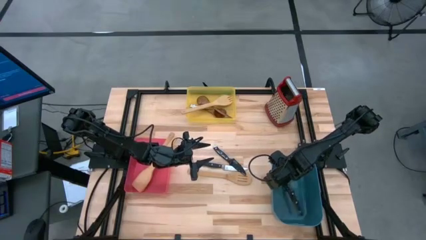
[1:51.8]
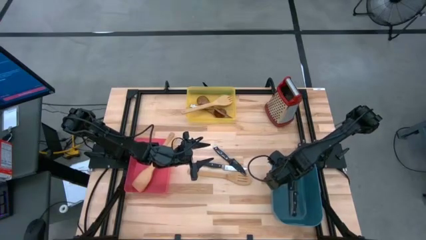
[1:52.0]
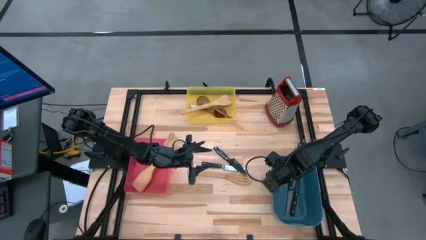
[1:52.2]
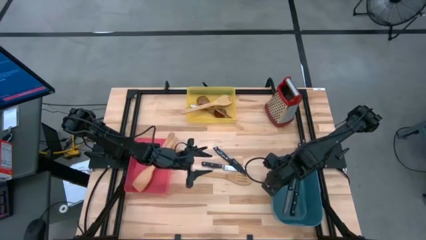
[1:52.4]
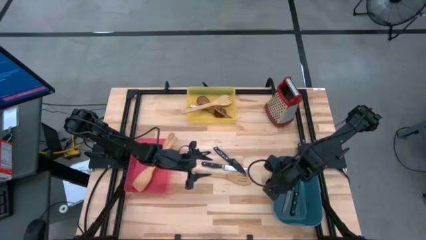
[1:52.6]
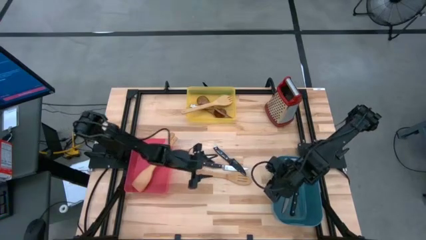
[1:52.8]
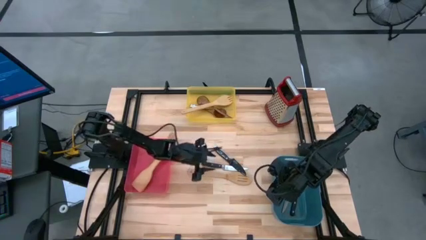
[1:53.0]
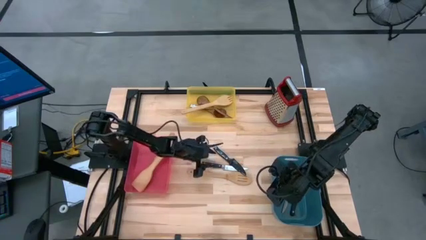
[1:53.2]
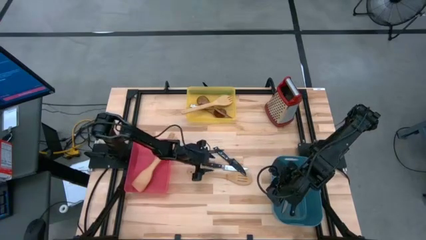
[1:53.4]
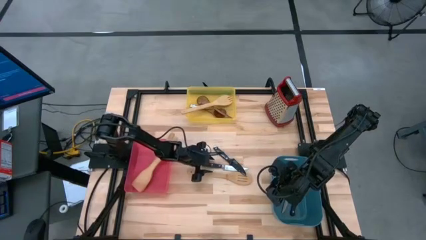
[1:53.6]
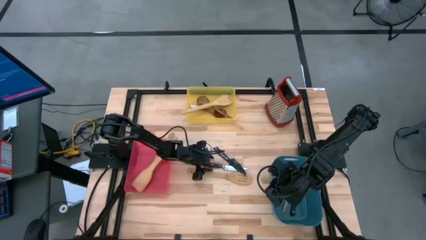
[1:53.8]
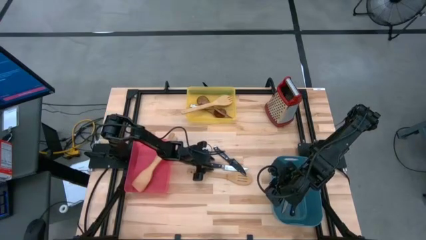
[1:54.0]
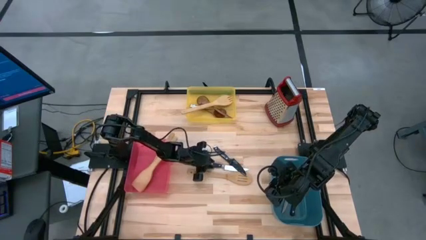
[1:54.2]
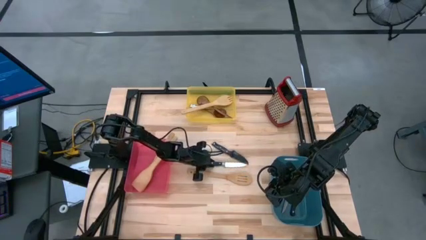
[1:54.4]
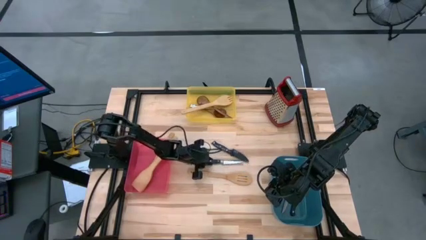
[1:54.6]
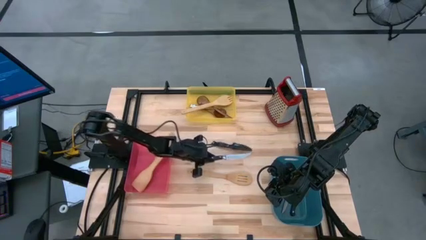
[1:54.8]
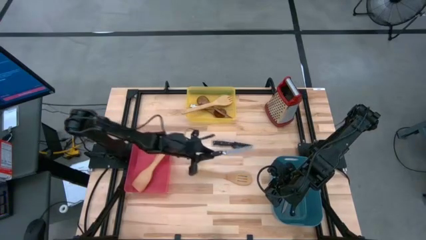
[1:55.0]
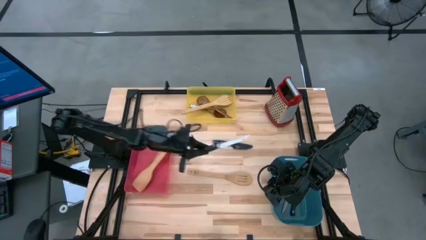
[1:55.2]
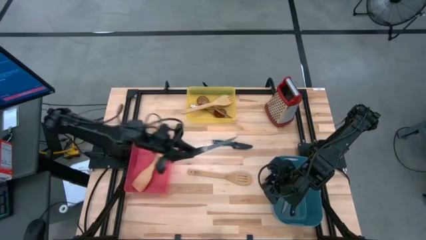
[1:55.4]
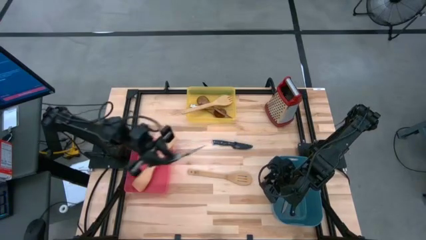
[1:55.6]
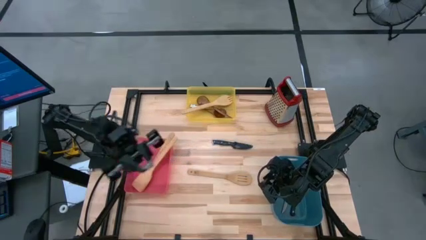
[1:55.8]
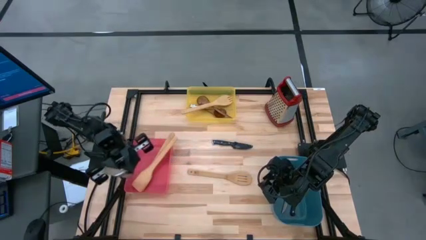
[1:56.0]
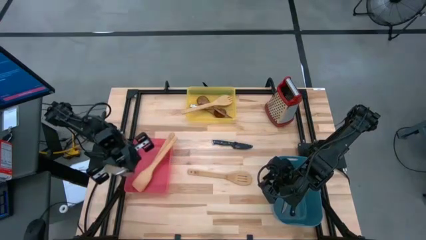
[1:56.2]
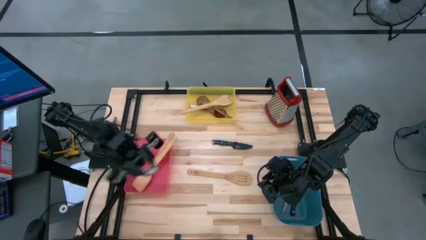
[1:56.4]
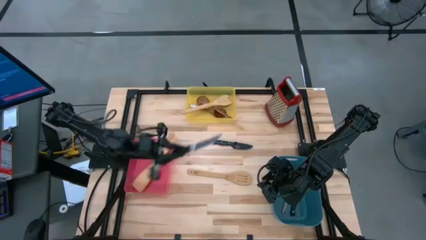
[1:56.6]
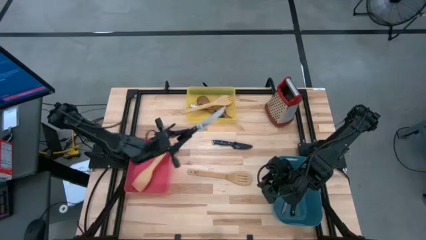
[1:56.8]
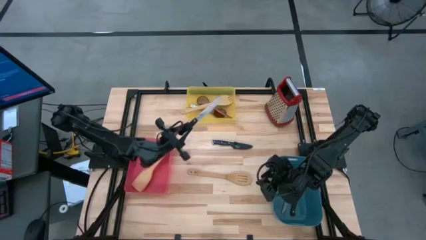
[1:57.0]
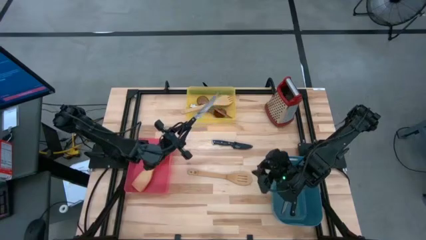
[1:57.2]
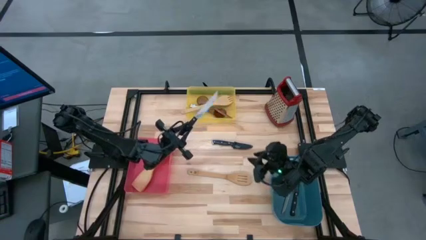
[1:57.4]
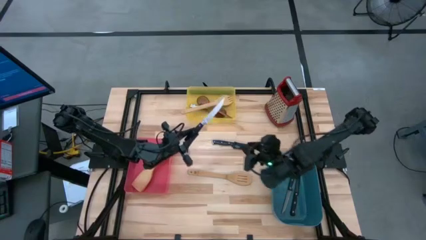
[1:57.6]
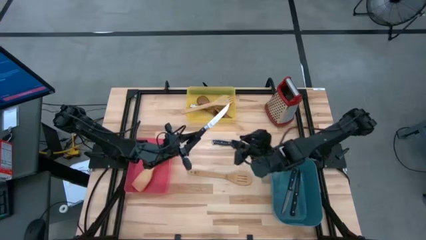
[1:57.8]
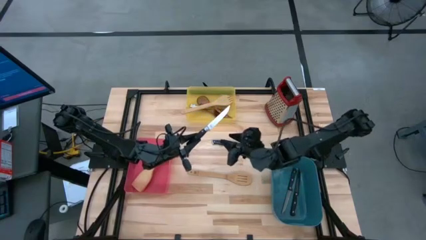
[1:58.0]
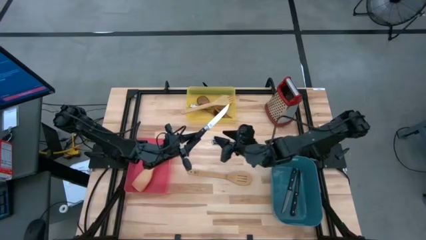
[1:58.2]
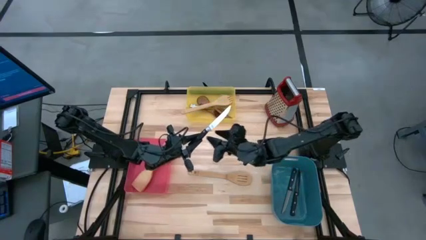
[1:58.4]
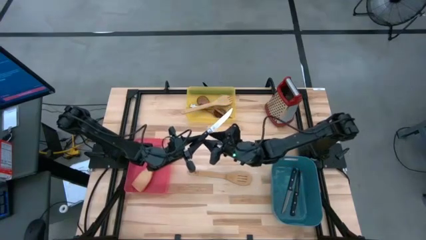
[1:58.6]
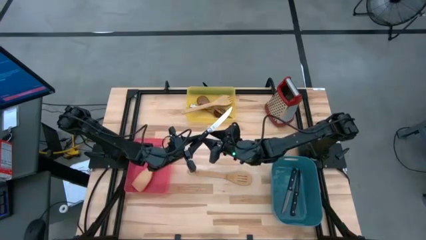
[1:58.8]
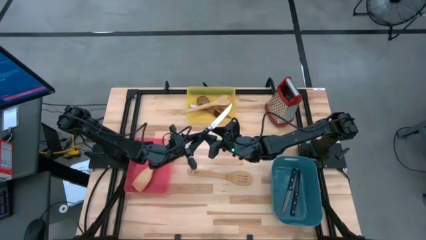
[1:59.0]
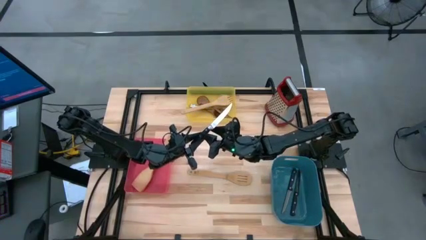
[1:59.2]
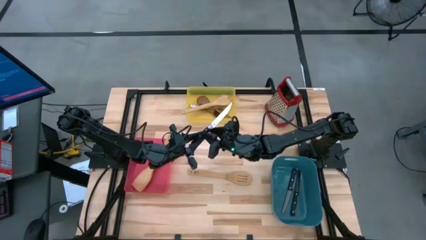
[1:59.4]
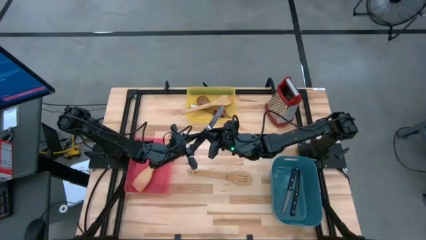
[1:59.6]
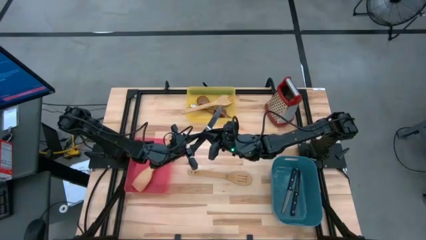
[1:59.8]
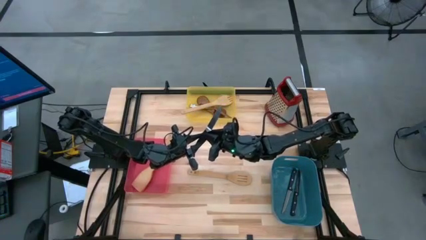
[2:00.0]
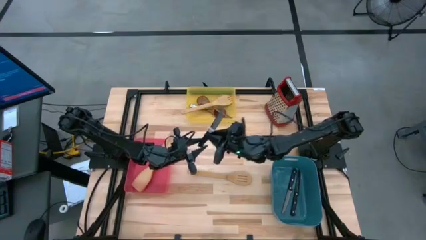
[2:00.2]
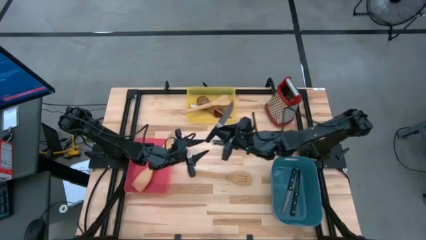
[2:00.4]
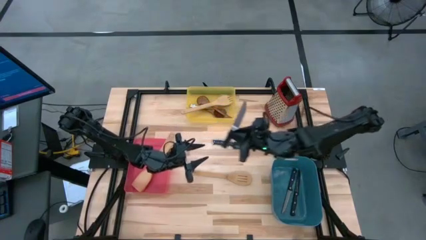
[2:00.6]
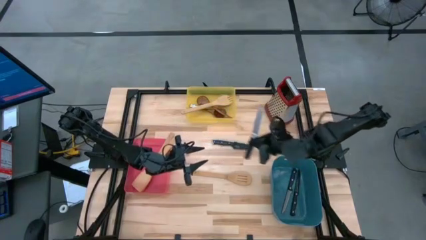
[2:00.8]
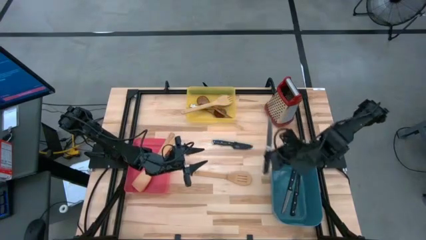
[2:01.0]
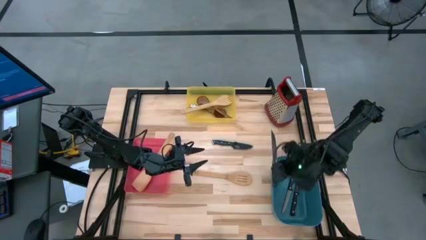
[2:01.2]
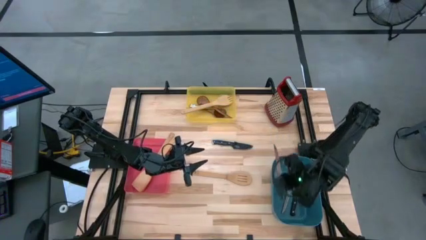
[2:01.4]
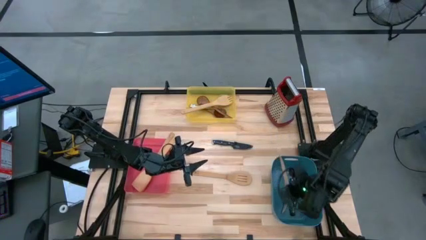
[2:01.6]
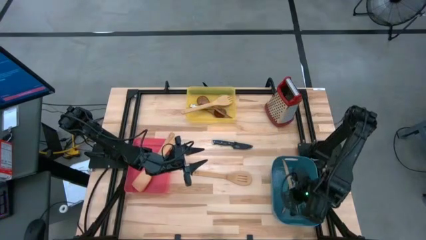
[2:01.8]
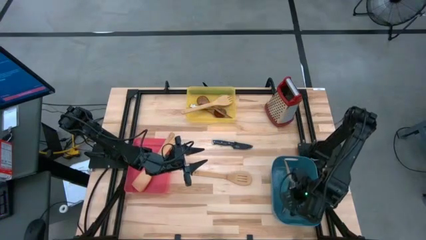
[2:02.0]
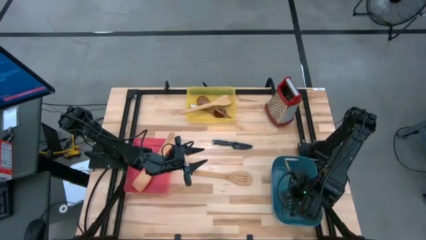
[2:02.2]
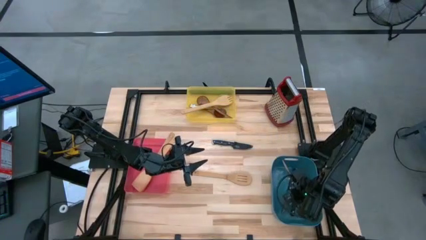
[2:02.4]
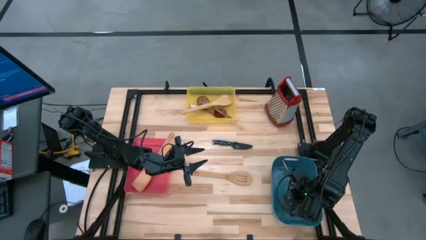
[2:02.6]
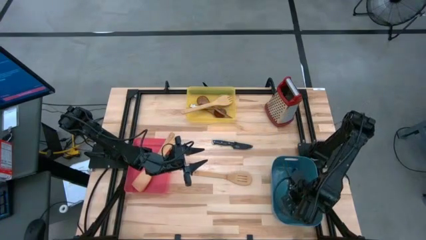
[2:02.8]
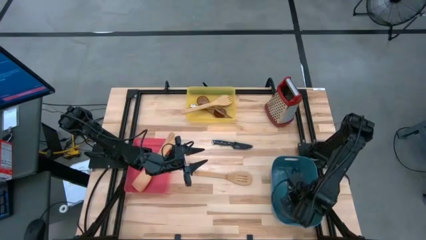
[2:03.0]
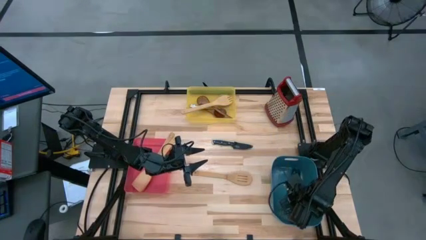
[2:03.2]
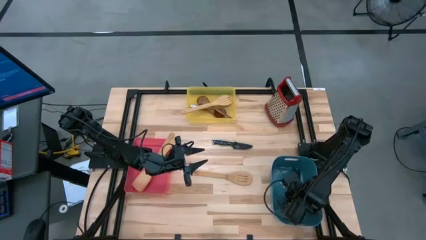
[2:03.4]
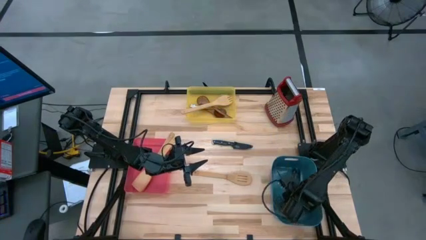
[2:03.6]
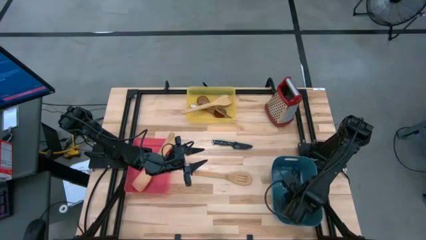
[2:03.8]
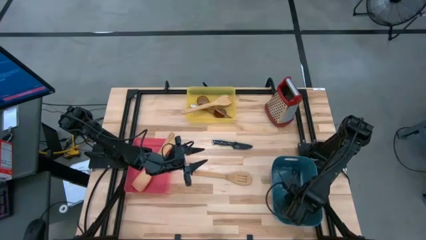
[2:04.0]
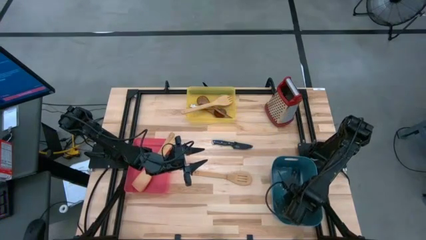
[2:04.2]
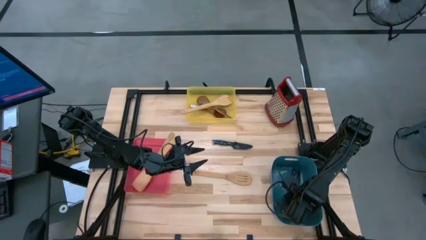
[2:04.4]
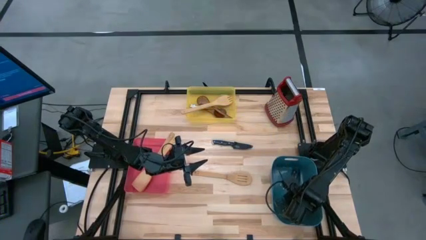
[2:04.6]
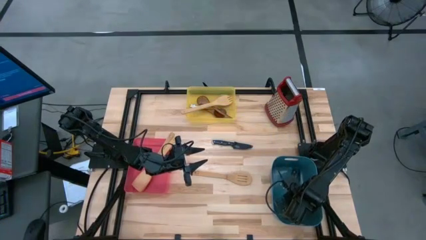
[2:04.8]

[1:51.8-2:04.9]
Task: Pick & Place Kitchen Items
Put the black knife into the blue bin

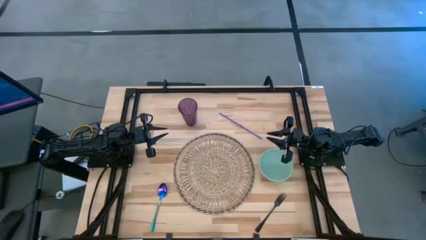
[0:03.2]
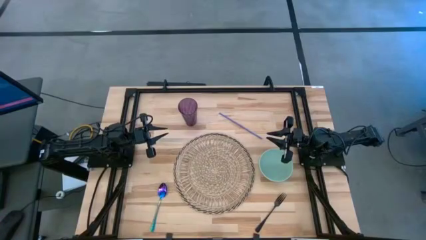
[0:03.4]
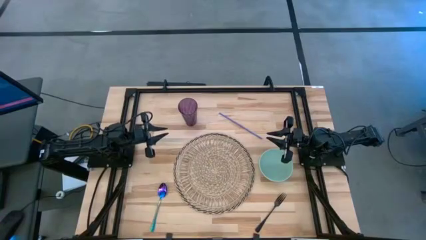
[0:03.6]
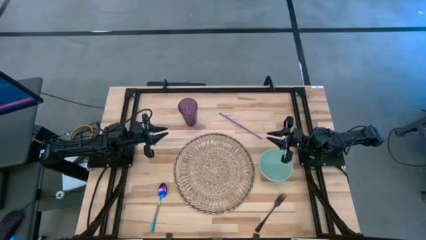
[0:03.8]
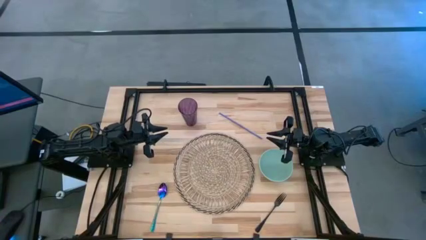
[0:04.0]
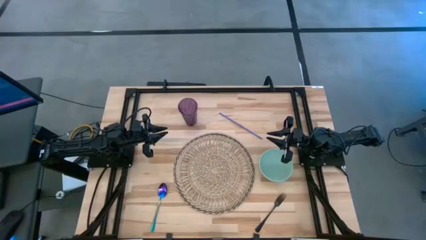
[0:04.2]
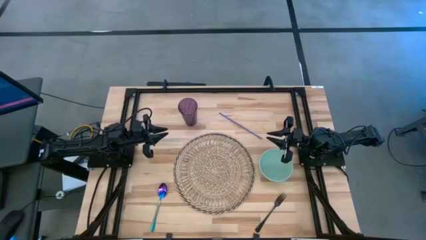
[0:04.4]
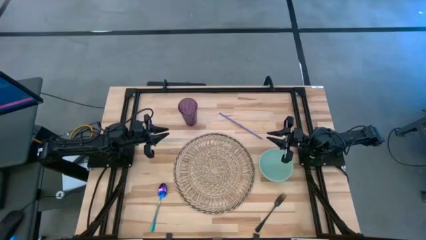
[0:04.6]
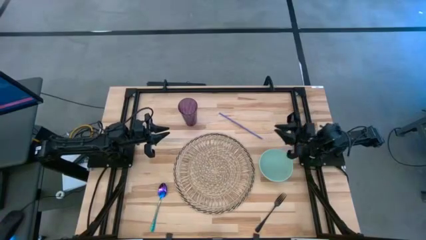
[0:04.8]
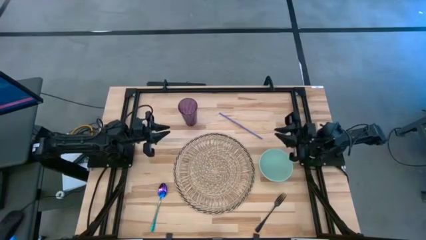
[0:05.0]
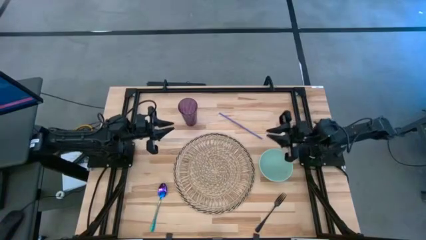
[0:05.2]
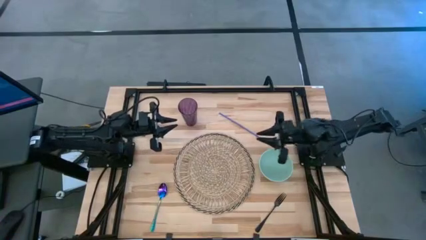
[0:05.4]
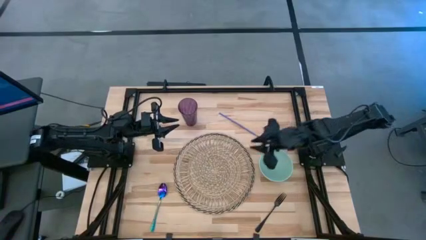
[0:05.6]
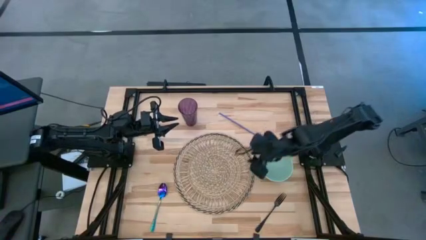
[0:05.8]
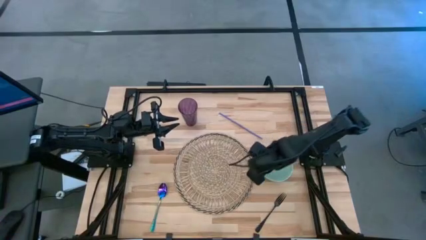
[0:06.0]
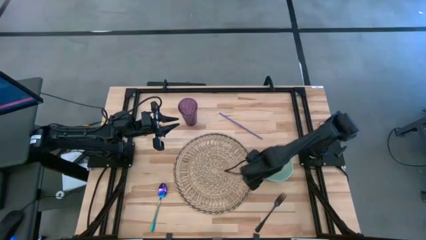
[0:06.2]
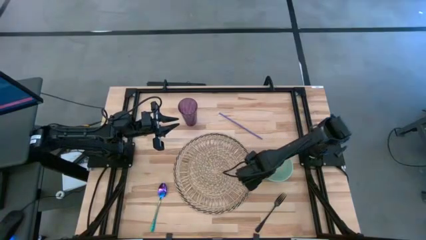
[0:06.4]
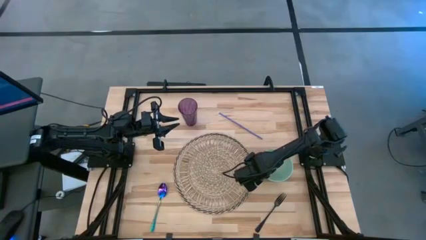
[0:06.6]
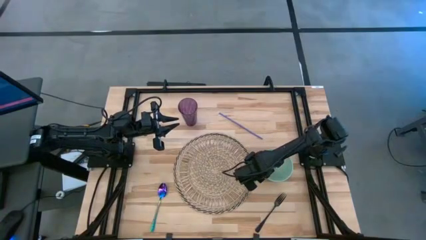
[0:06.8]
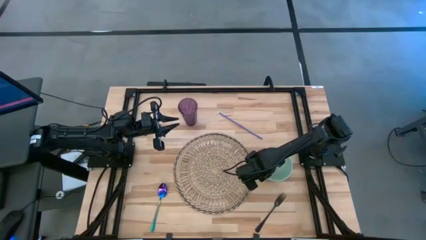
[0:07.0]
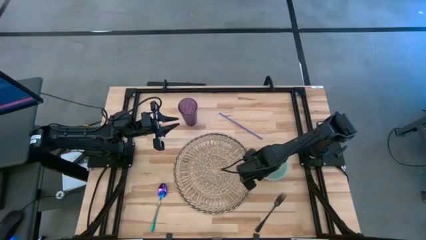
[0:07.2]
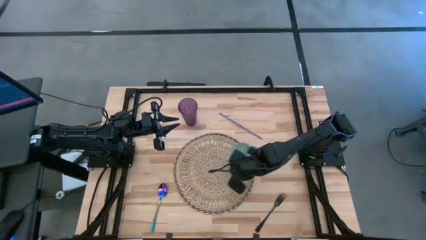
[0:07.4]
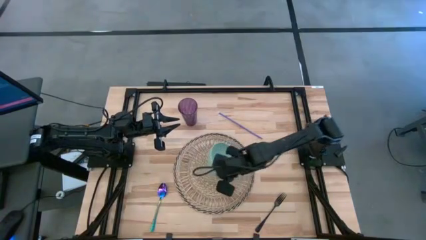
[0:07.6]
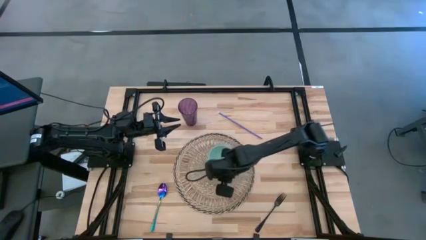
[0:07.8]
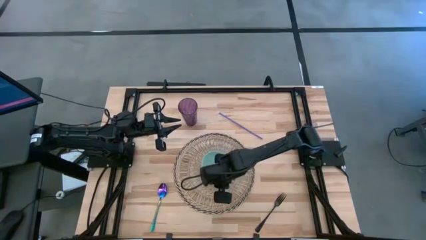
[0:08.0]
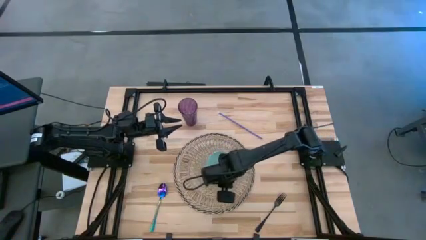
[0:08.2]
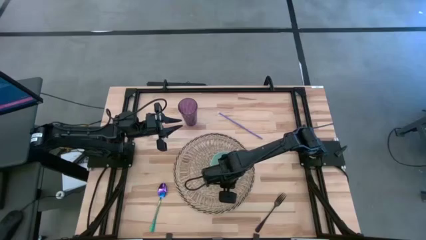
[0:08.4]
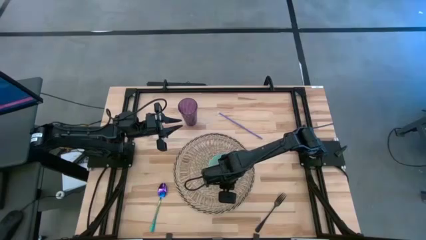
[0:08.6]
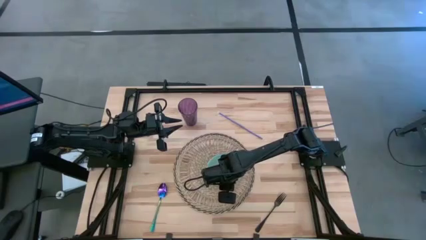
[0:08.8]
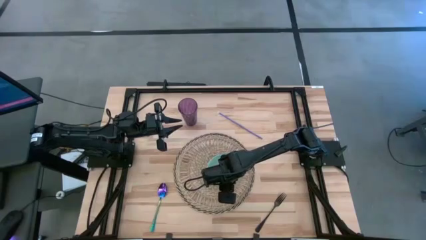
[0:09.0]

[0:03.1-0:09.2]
Task: Pick & Place Utensil
Put the light blue bowl on the table placemat
